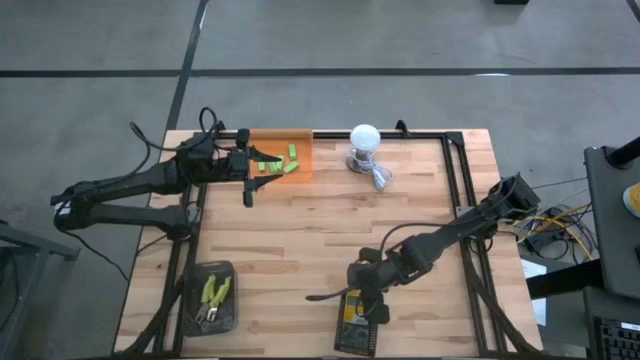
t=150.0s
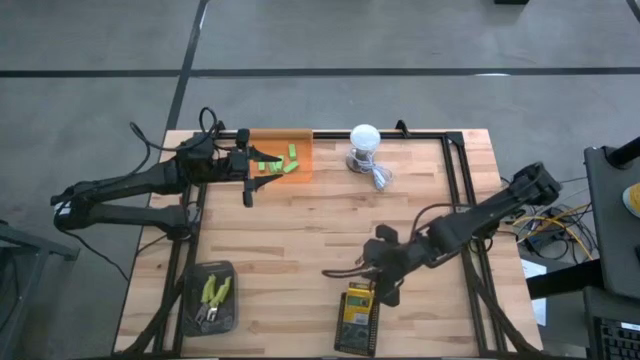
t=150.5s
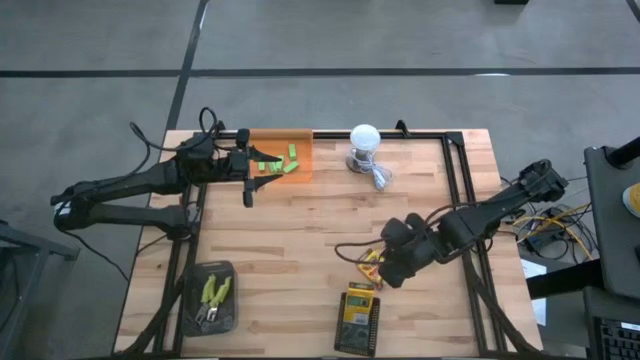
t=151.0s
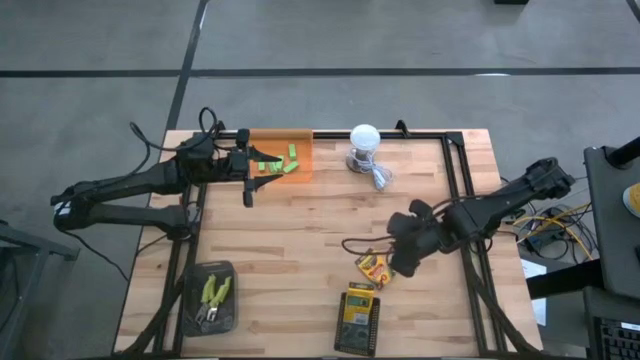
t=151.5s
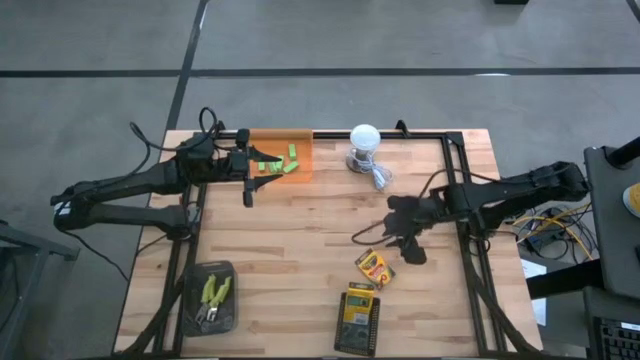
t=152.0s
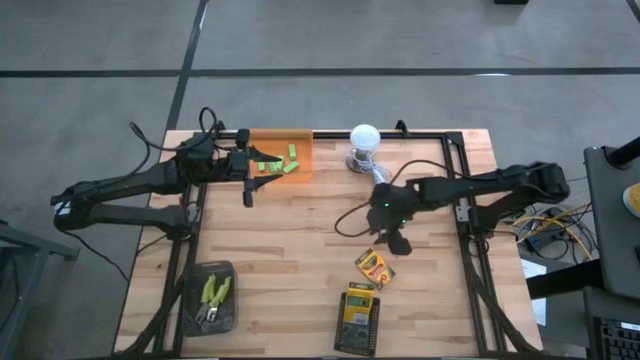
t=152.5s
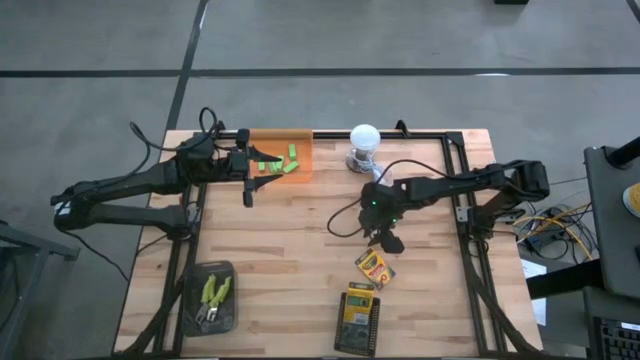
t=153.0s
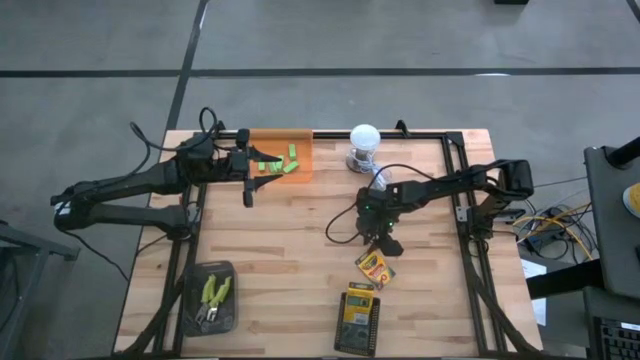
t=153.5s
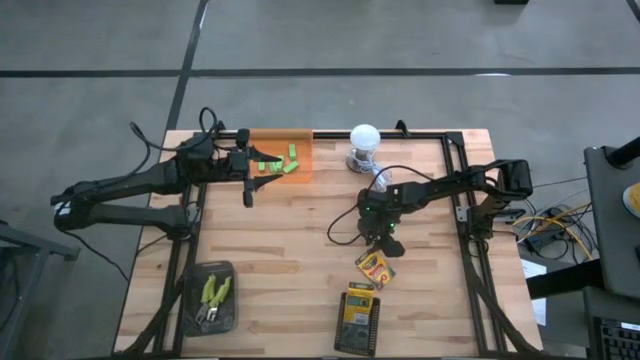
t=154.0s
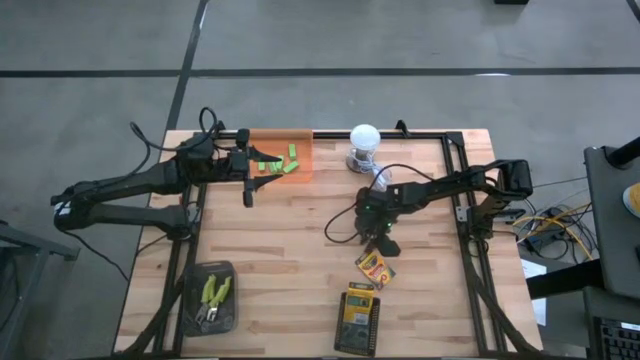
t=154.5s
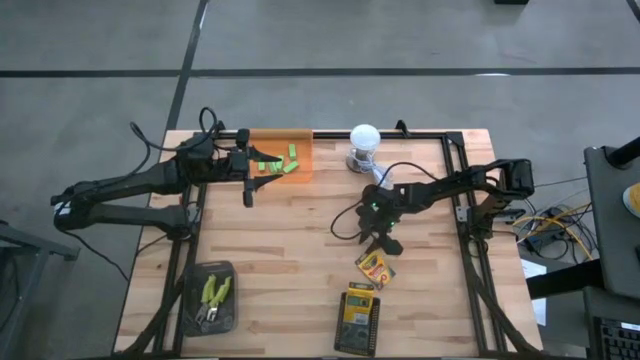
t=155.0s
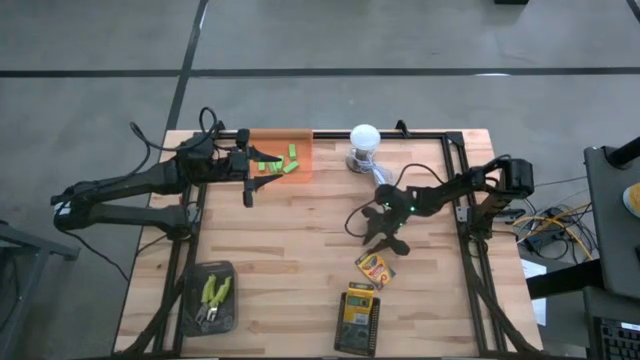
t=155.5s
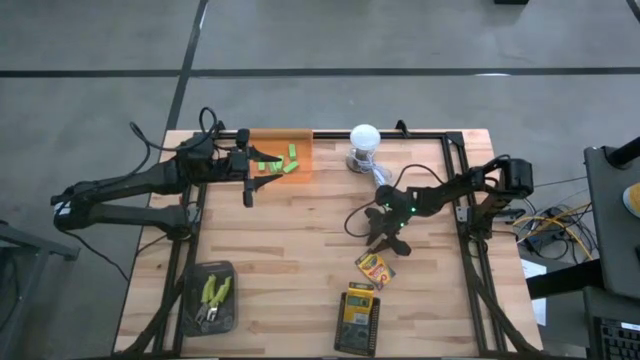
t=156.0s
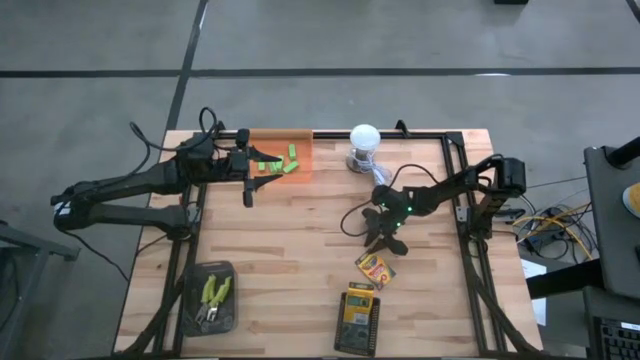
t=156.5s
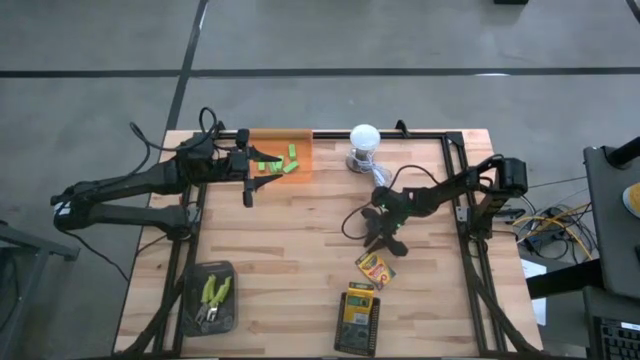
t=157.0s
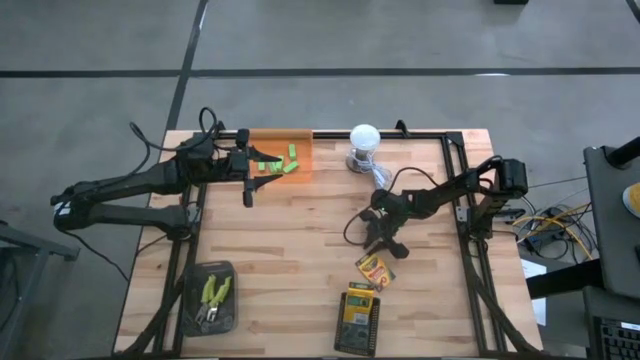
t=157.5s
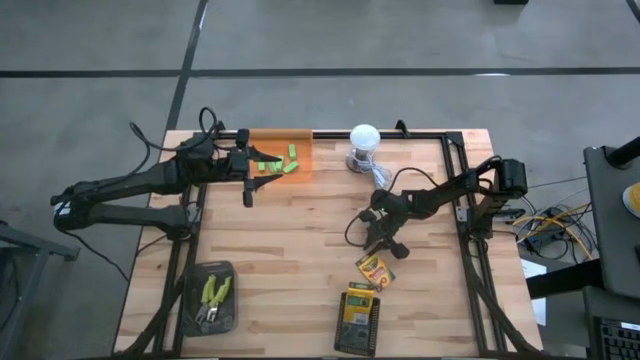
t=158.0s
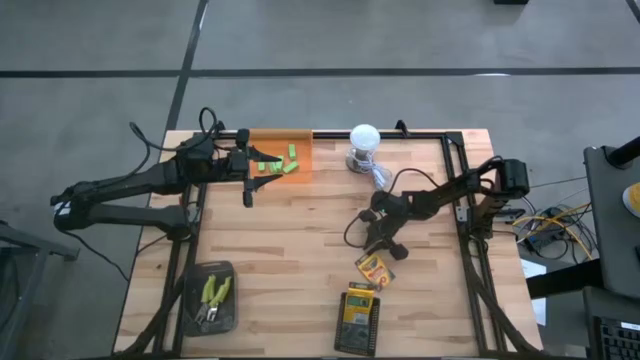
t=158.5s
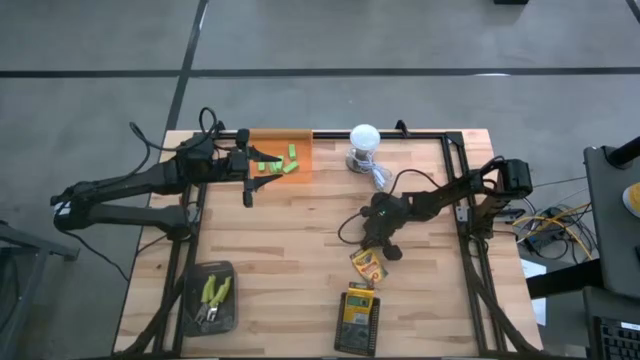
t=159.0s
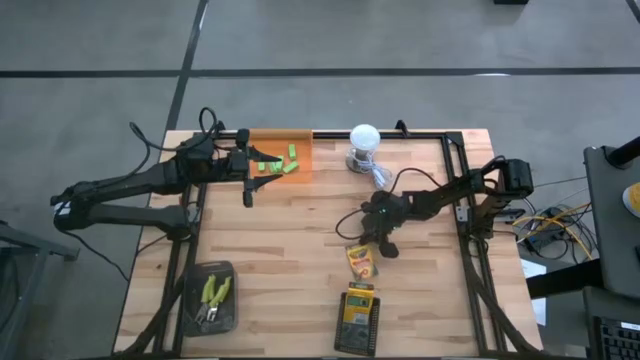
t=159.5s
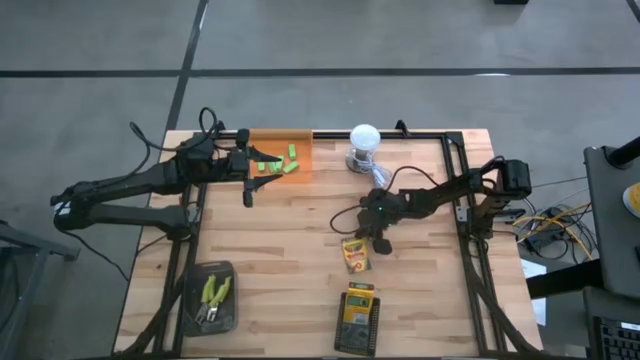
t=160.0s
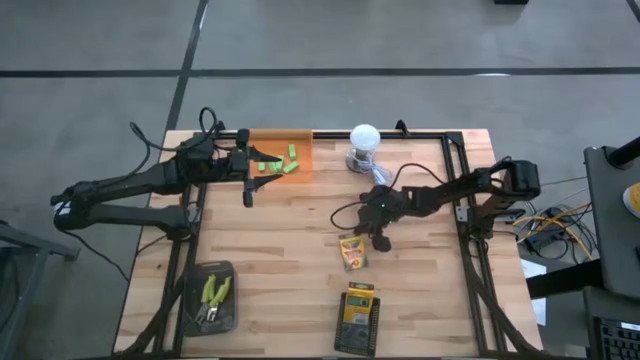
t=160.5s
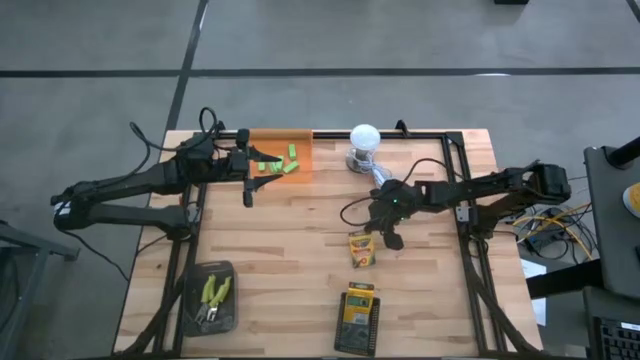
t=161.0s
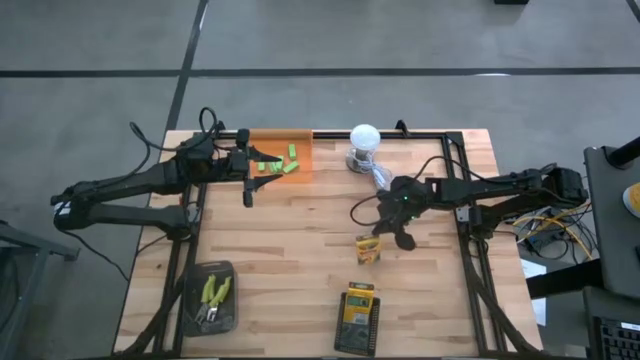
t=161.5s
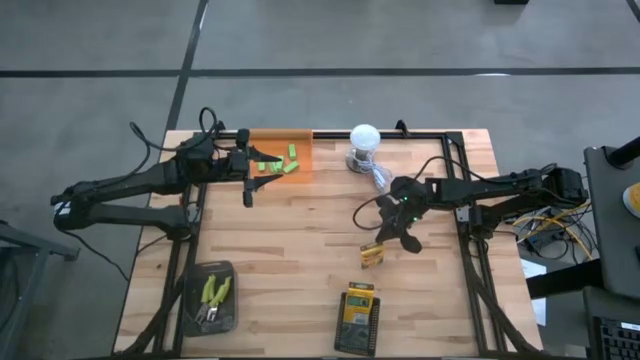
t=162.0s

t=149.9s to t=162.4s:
Task: Pick & Place School Supplies
Put the crayon box into the right black bin
